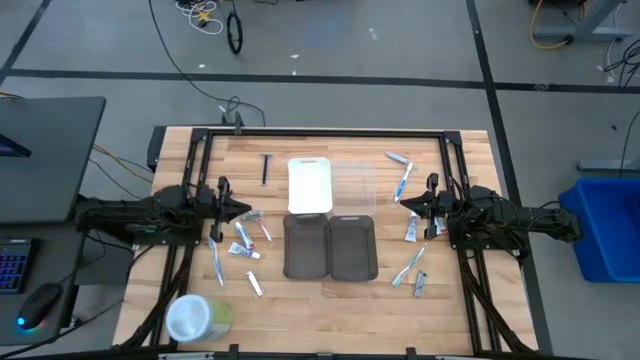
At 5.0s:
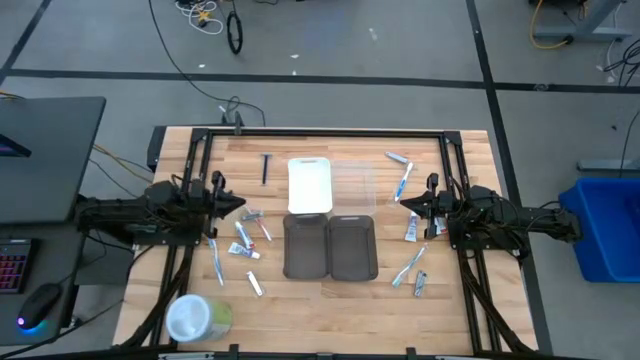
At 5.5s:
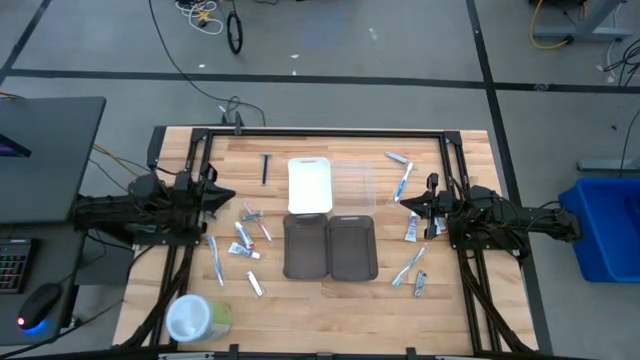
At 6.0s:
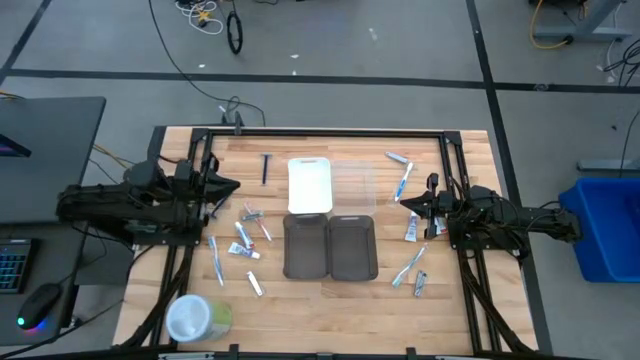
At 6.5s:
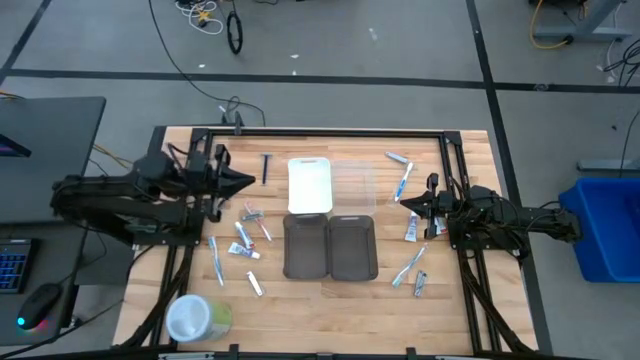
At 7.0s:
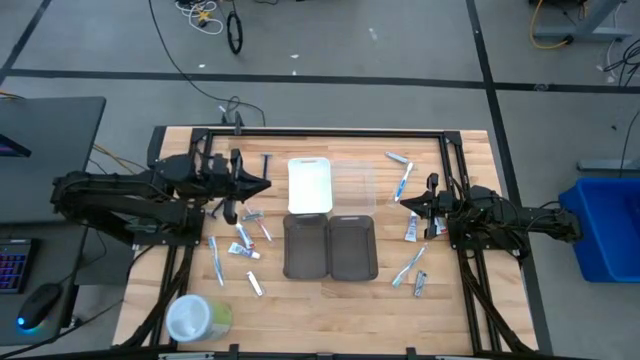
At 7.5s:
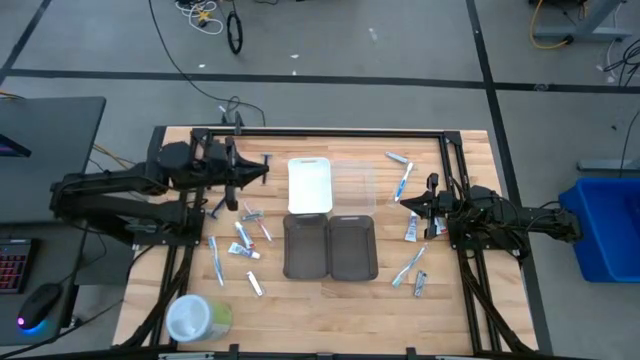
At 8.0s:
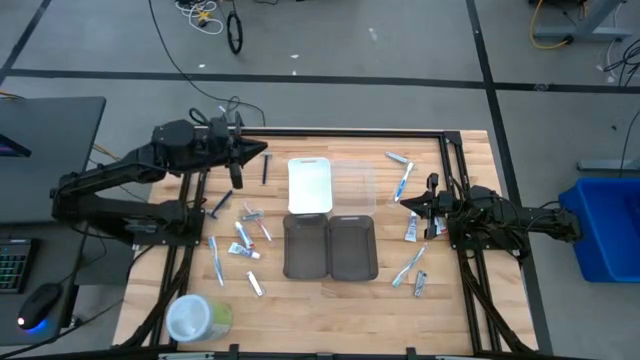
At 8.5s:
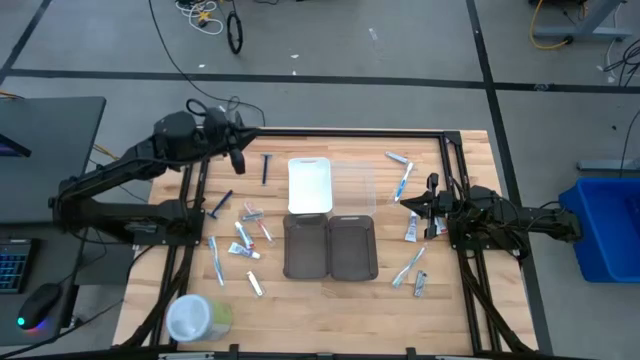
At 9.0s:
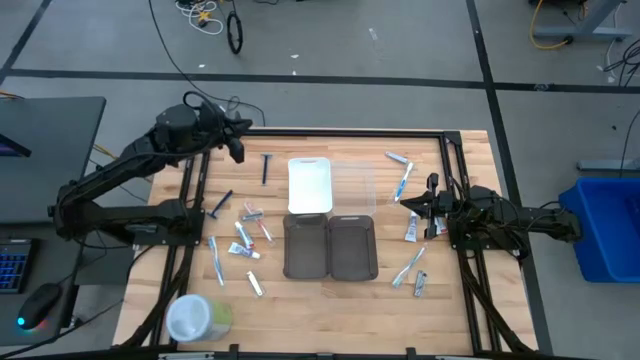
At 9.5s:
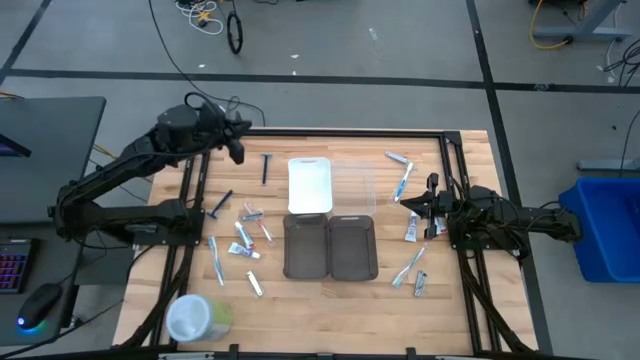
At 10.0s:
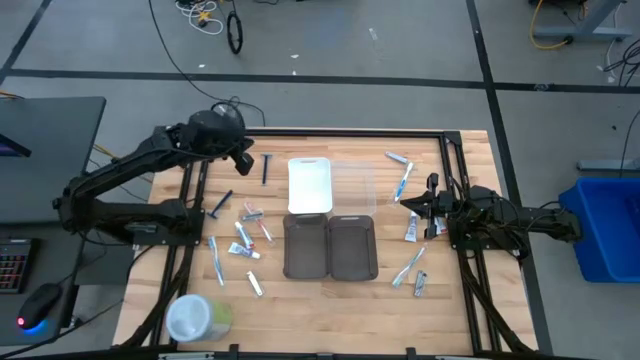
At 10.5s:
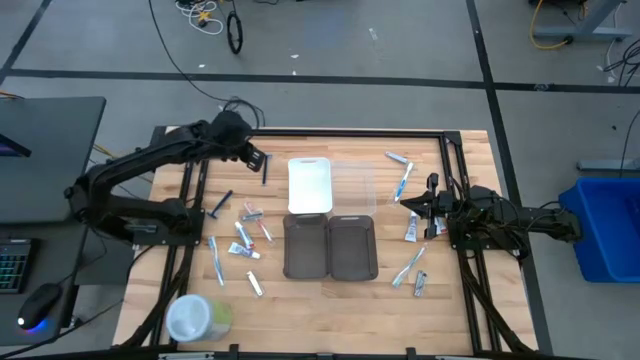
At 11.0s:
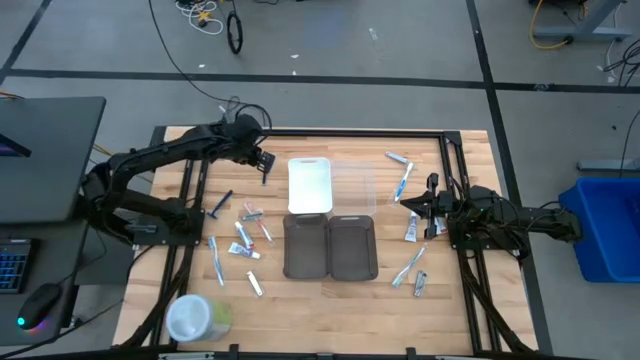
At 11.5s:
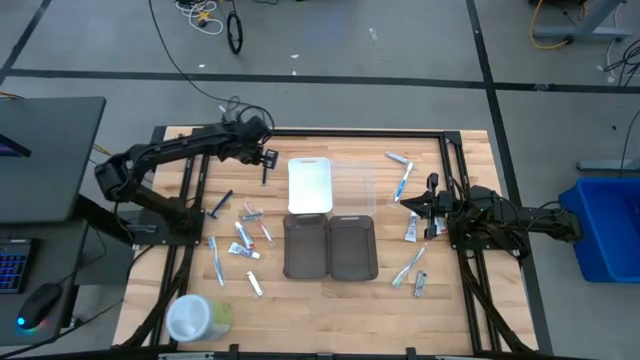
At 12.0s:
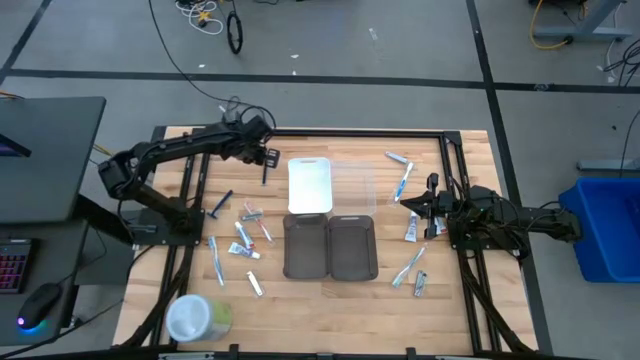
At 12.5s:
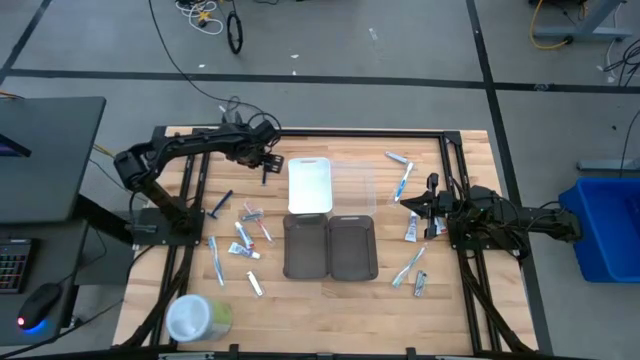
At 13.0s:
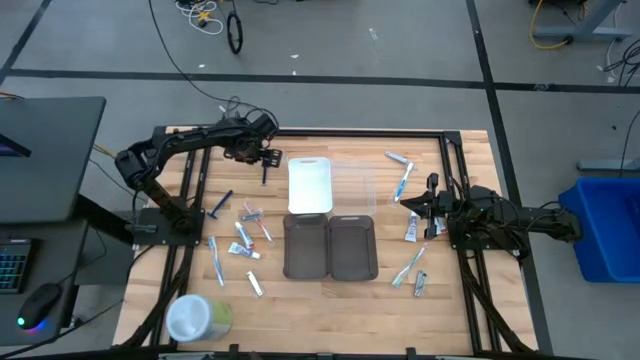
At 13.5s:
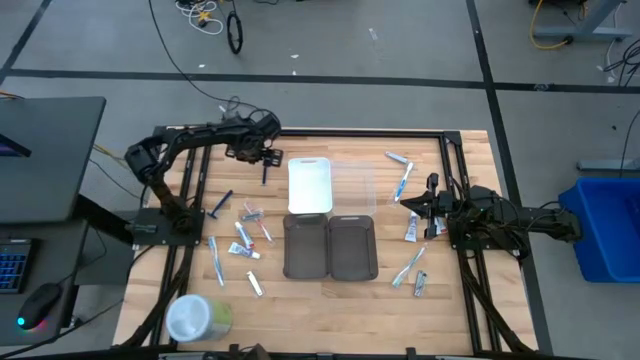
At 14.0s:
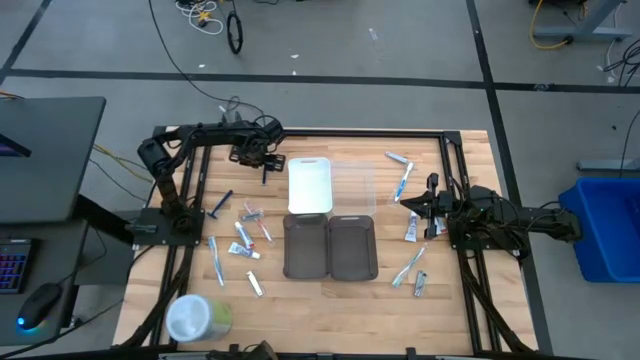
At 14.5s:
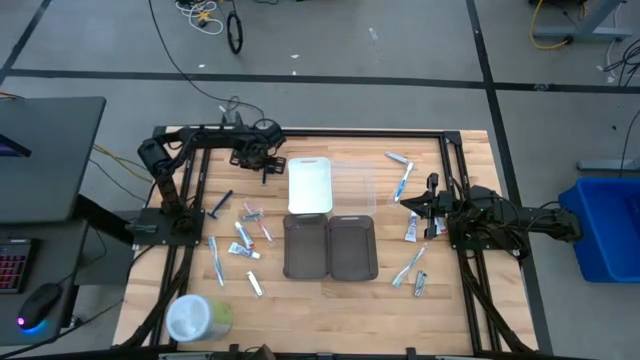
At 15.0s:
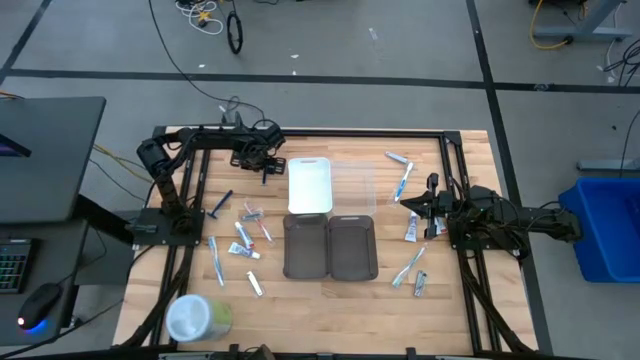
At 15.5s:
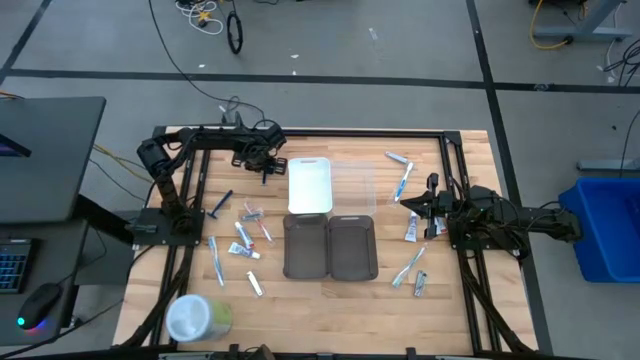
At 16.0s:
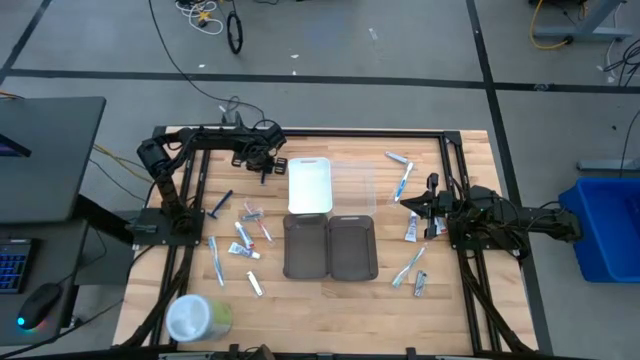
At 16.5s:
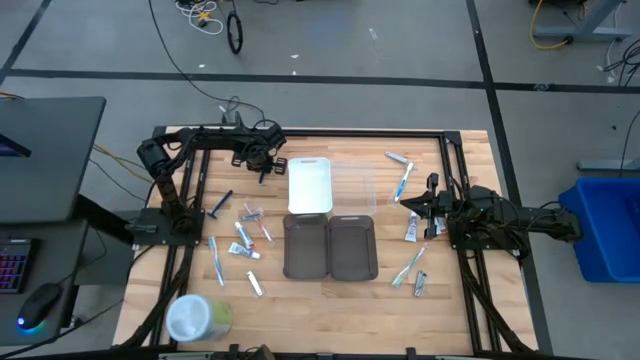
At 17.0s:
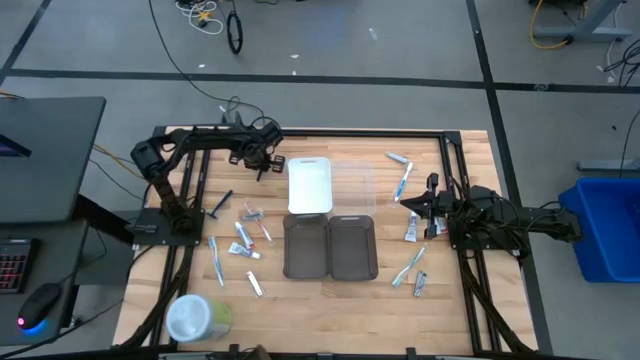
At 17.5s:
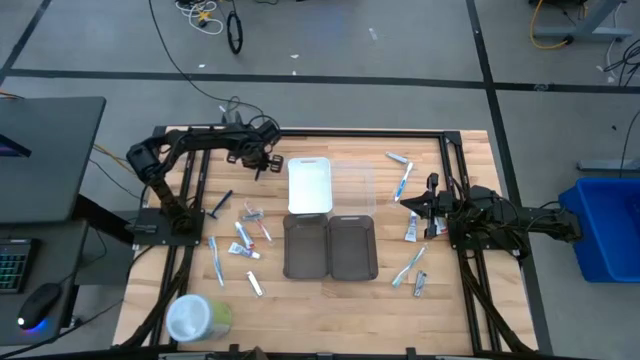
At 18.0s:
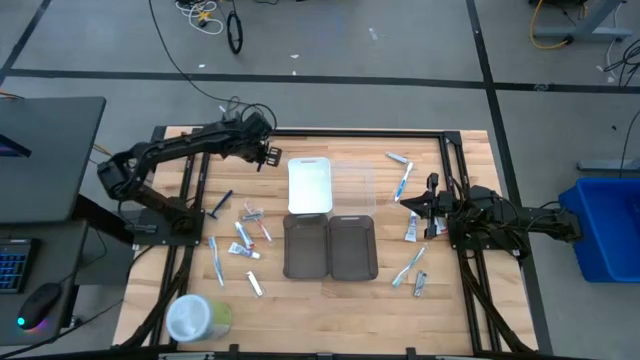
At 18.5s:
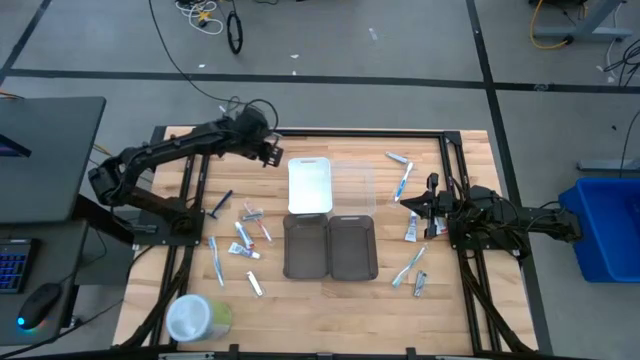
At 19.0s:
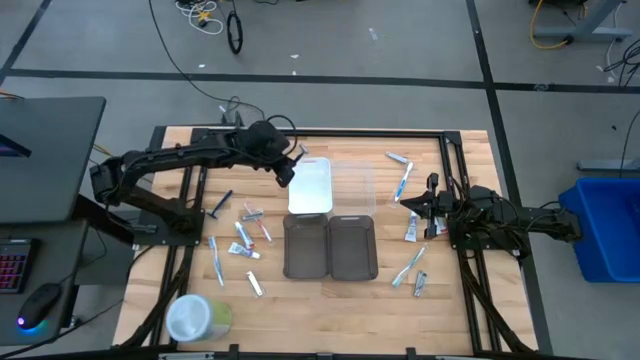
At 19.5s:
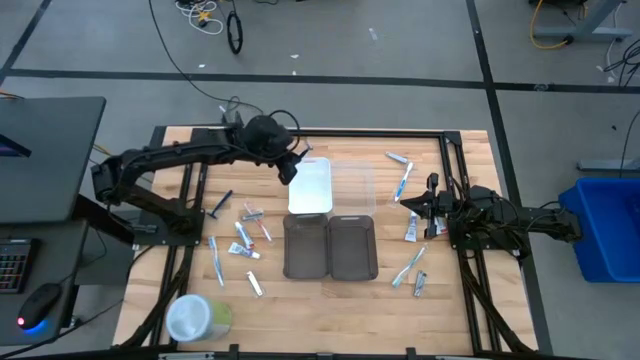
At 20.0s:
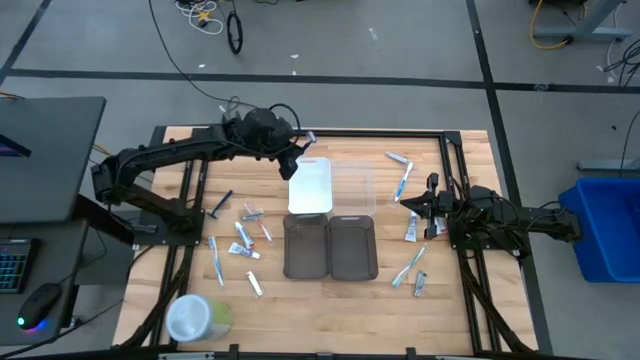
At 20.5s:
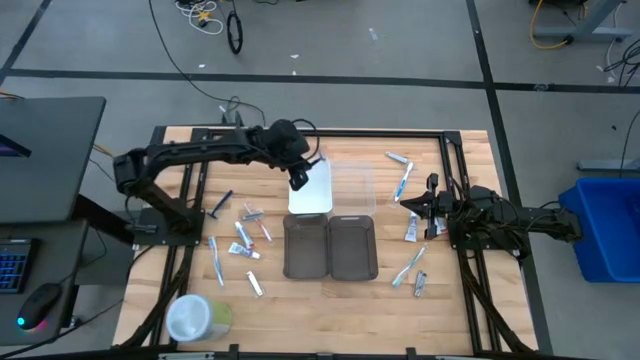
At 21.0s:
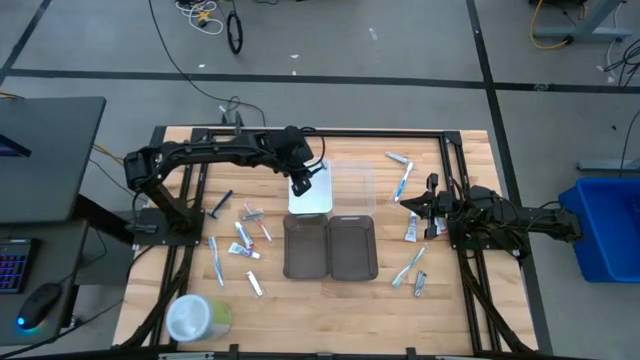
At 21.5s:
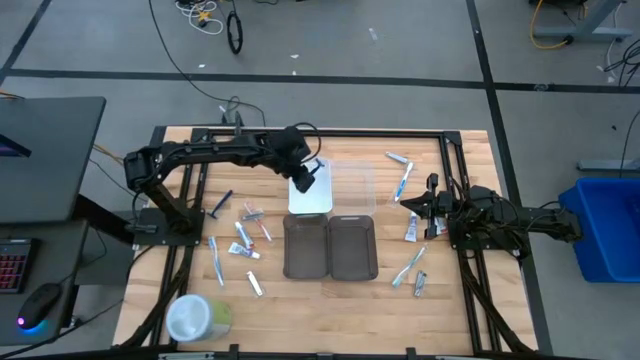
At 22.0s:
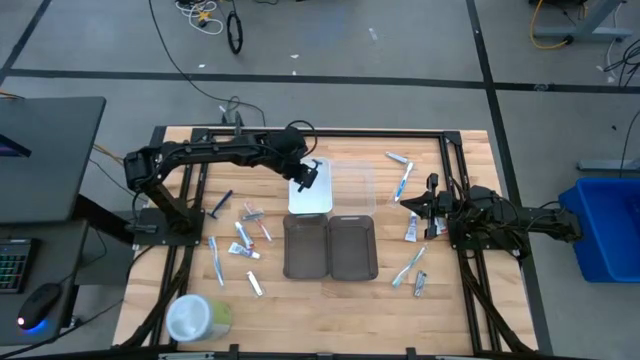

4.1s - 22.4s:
Task: Pick & Place Travel size toiletries
Put the blue razor into the white bin

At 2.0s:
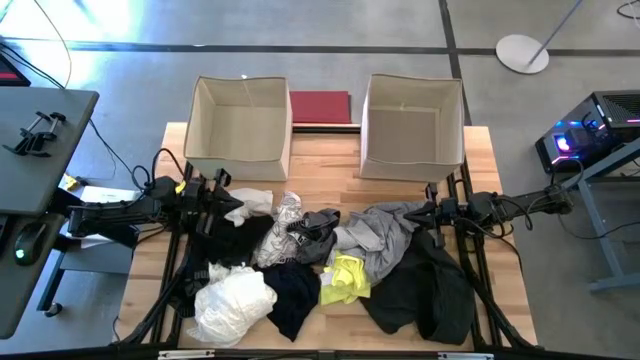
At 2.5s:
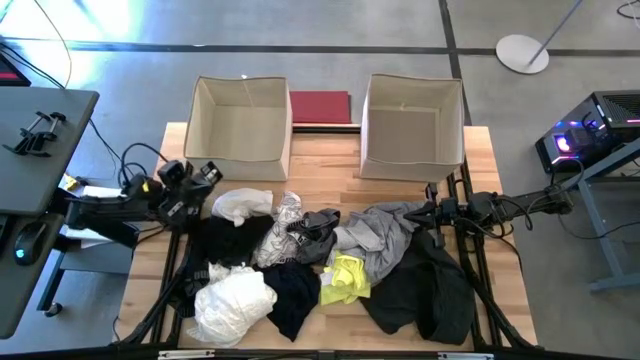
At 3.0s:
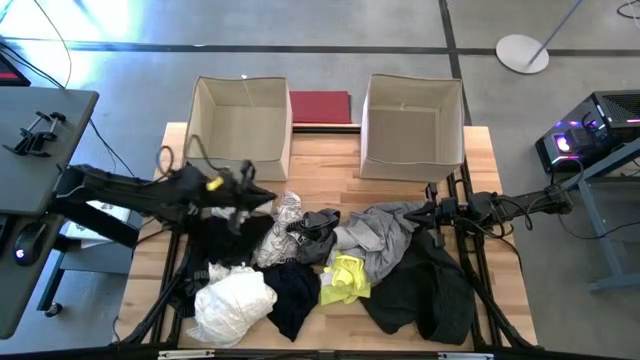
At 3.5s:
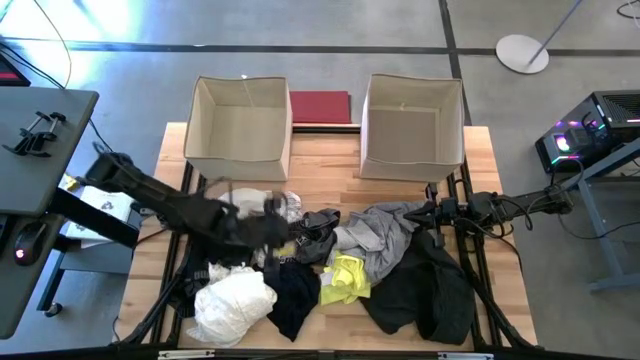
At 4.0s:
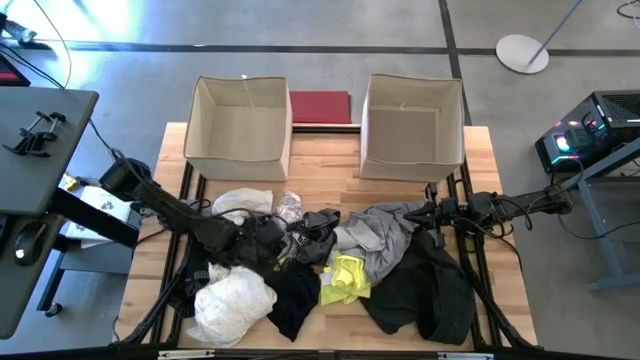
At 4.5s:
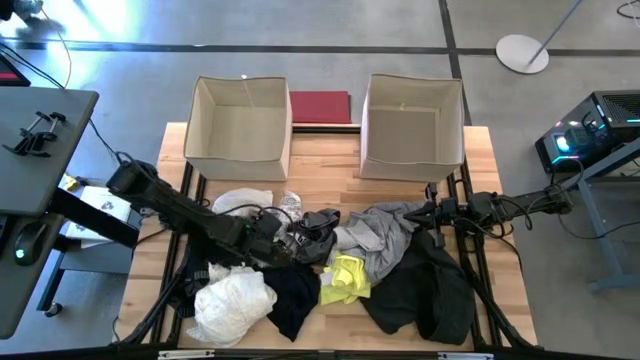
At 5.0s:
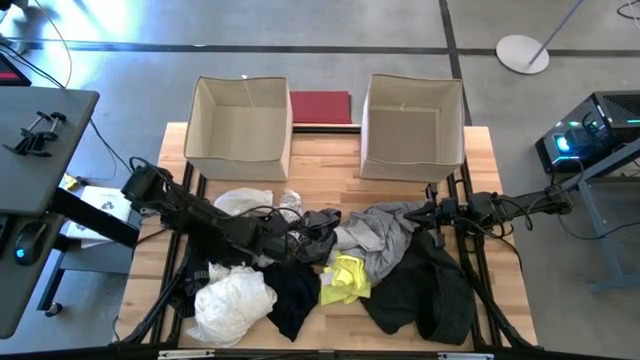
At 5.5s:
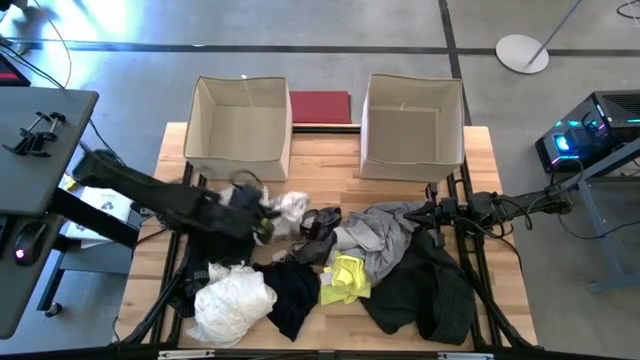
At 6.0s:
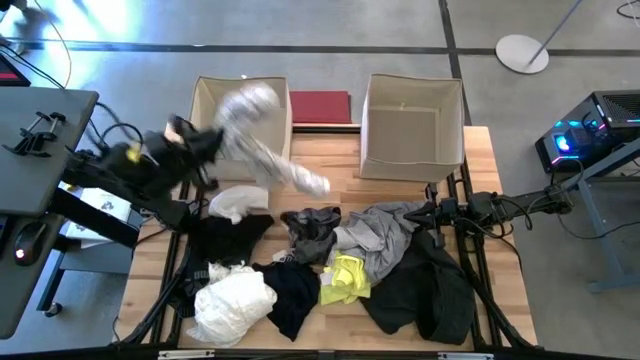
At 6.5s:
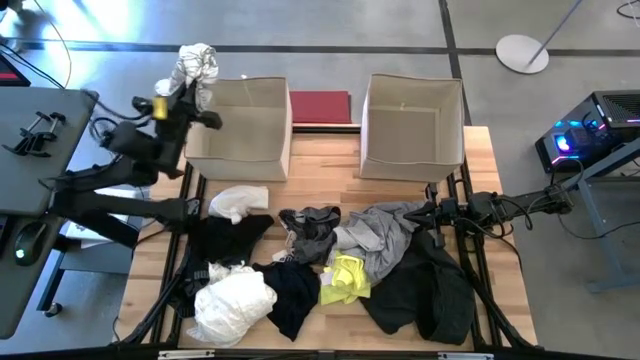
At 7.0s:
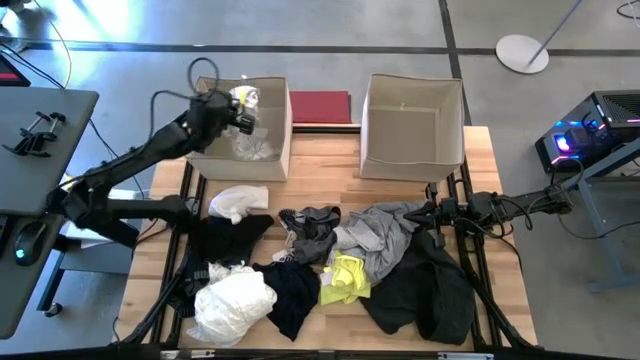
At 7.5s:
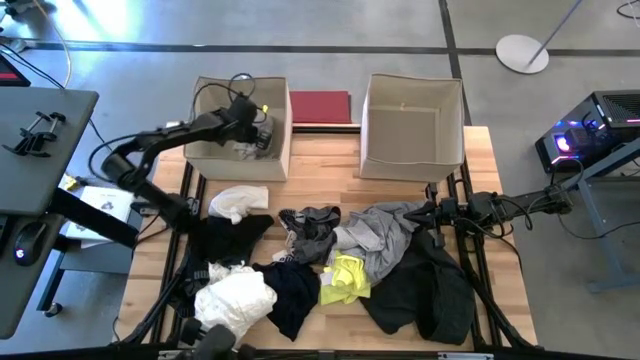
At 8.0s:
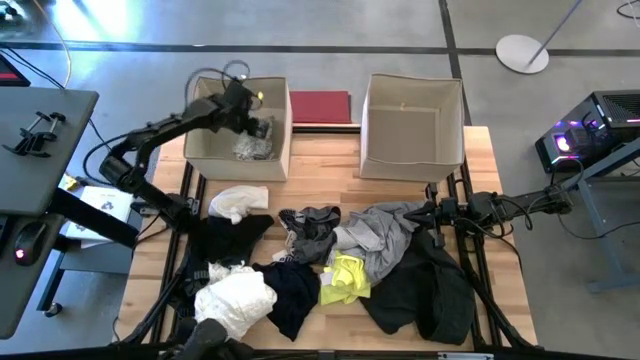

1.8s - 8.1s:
Task: Sort clothes
Put the white shirt into the left brown laundry organizer
